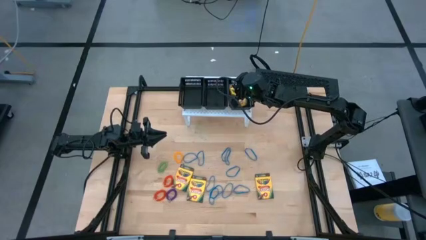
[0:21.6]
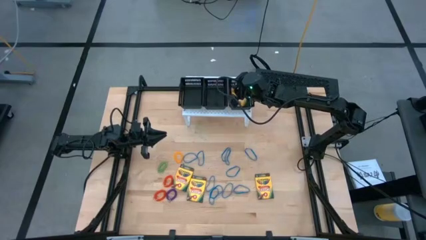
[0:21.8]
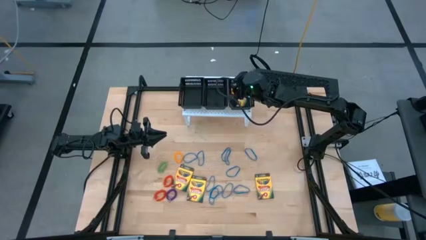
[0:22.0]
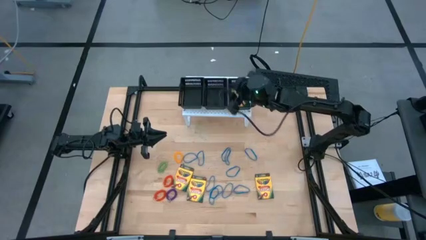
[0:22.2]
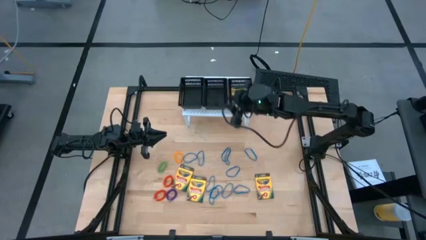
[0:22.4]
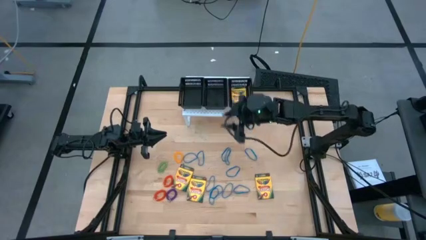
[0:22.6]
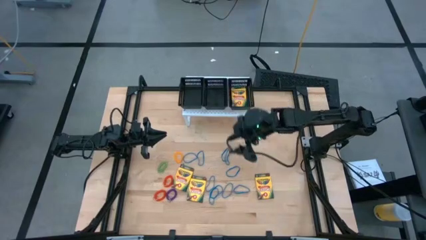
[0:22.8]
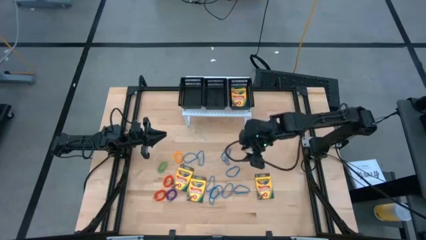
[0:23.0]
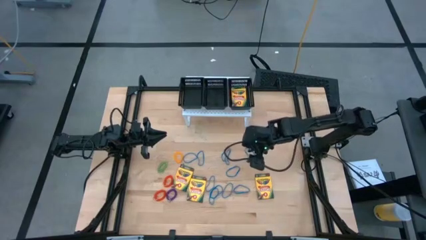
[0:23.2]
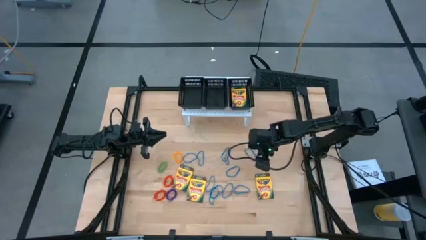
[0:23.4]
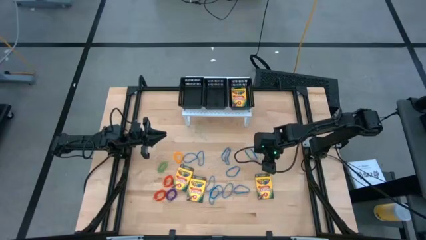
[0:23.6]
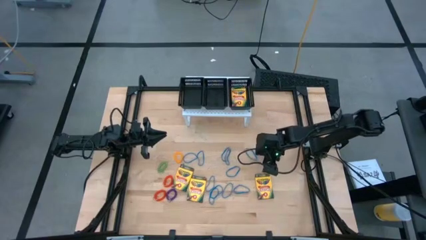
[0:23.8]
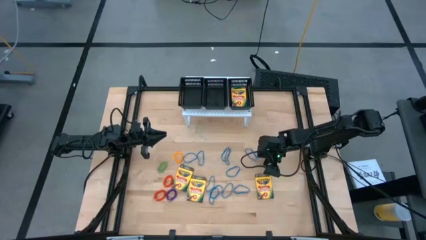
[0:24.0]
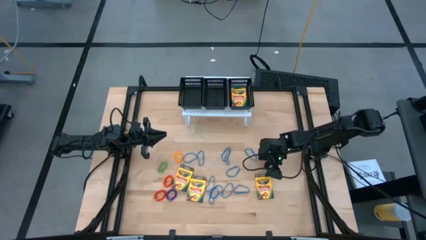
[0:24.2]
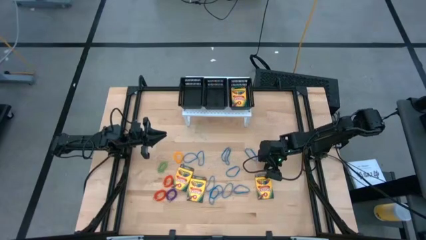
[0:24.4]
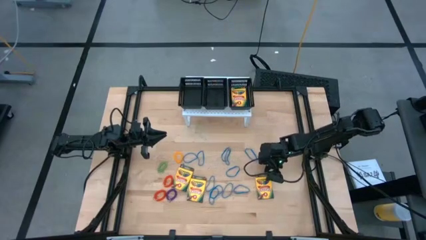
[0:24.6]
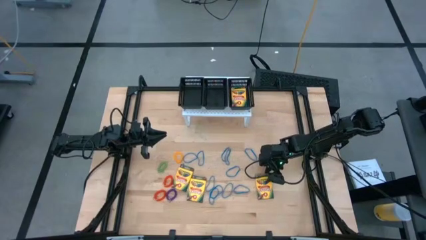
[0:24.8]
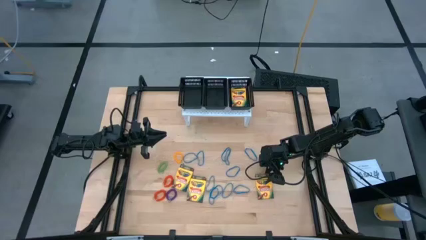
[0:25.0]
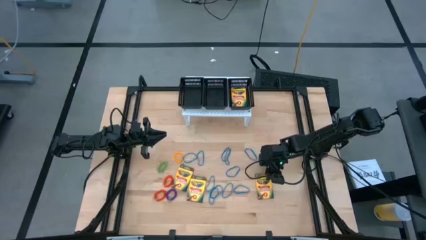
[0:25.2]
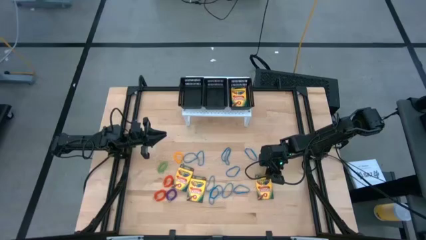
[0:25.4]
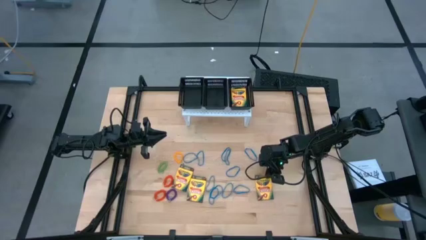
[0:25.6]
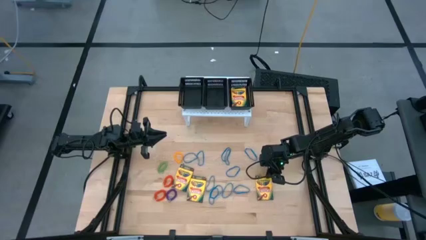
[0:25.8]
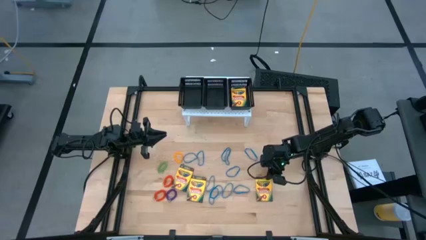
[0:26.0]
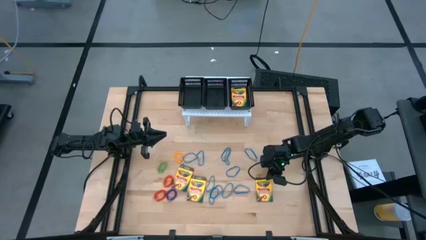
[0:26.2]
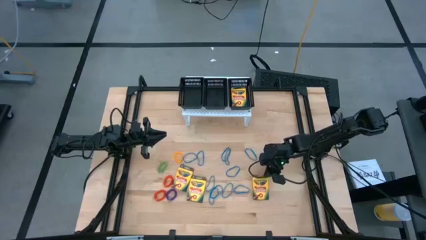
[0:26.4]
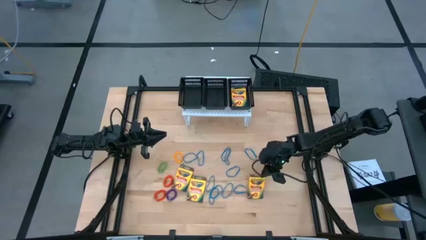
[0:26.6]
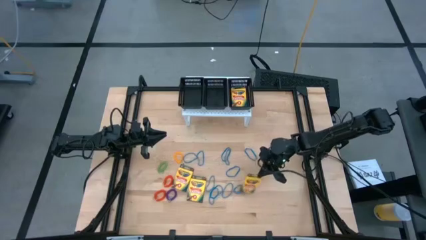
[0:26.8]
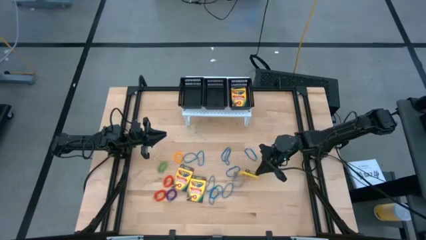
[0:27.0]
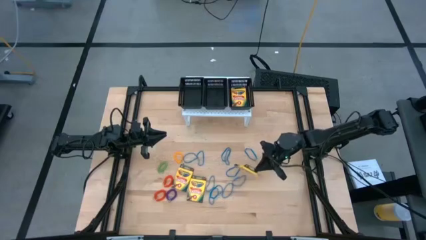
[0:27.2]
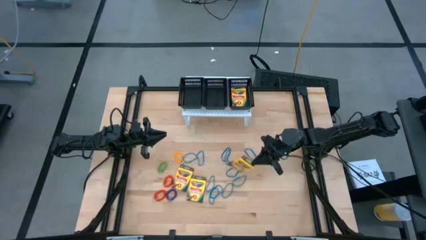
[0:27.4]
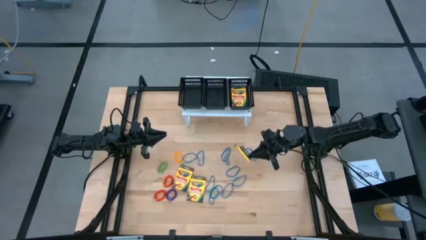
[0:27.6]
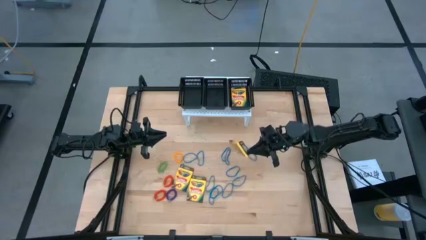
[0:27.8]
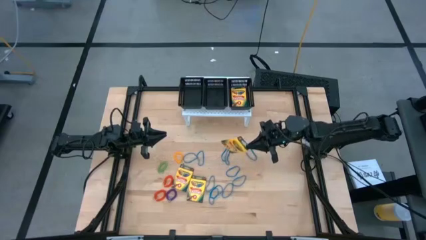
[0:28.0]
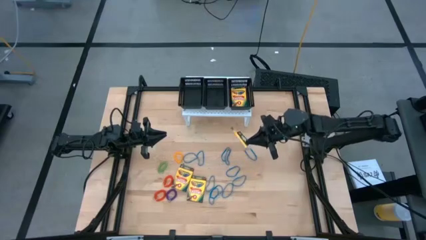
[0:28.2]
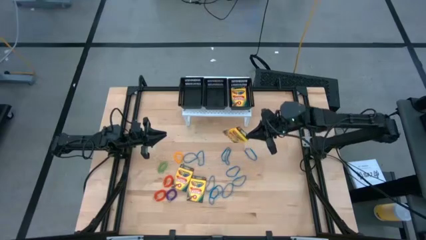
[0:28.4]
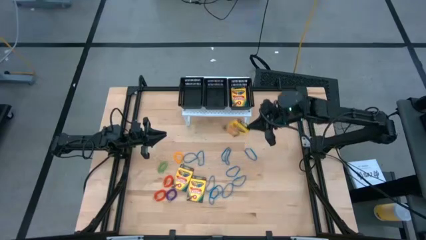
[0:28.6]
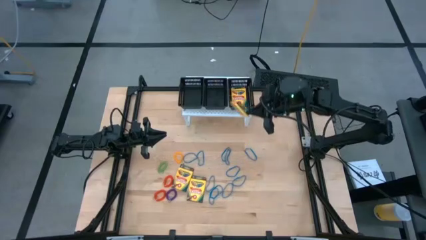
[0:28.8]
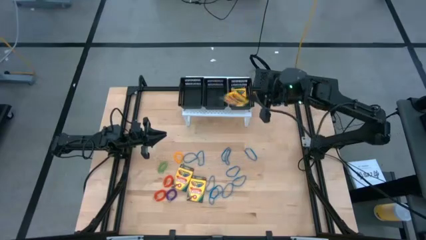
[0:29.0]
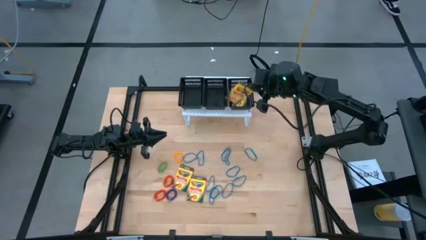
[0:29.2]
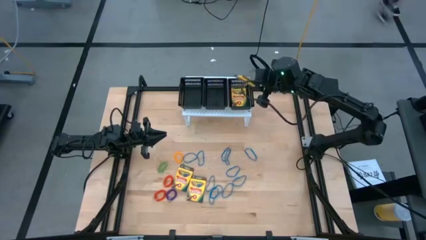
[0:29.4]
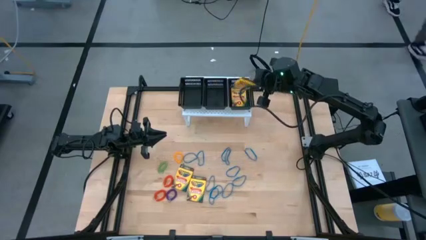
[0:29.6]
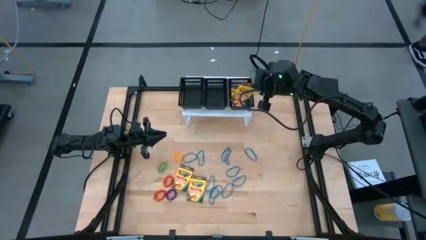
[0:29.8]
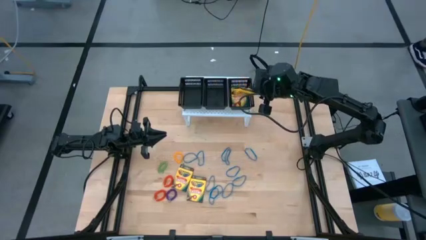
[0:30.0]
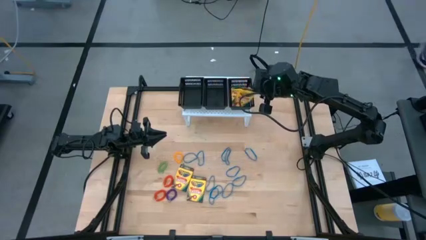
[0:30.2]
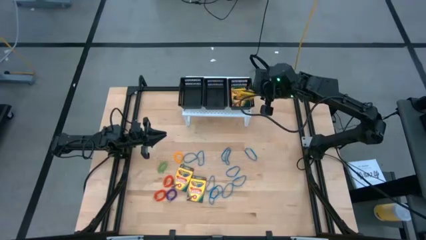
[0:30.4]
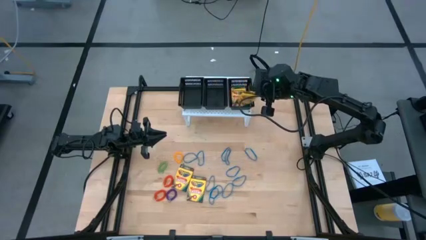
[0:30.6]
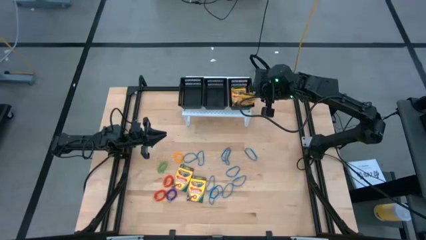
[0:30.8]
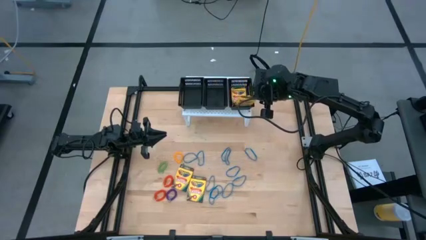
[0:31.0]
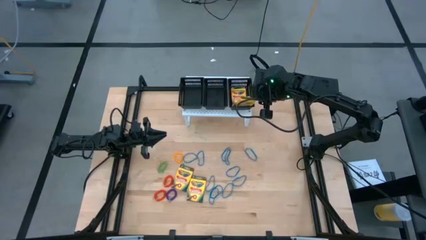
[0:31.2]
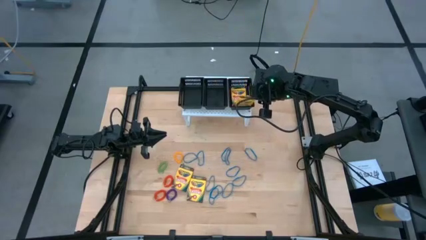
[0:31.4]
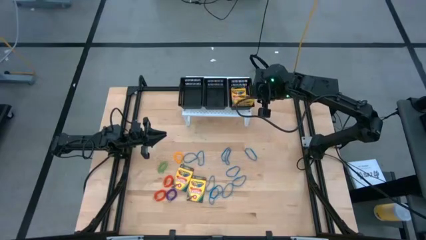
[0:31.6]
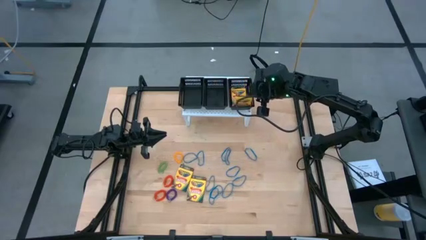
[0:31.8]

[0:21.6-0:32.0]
Task: Pick & Place Office Desk Supplies
Put the crayon box into the right black bin

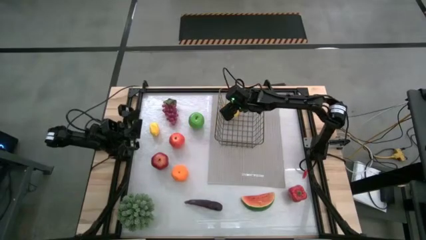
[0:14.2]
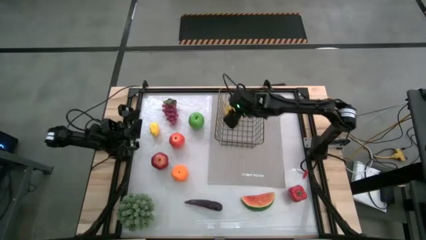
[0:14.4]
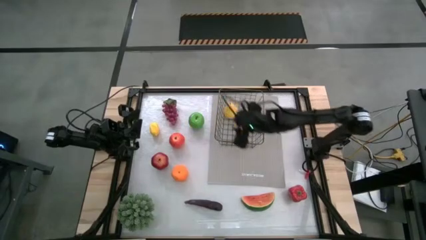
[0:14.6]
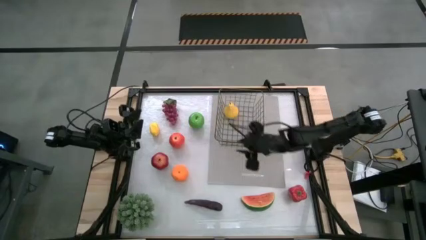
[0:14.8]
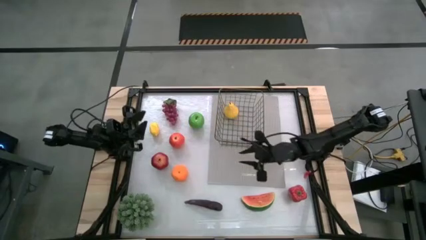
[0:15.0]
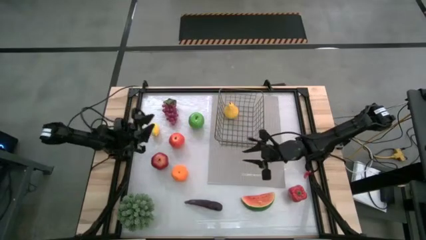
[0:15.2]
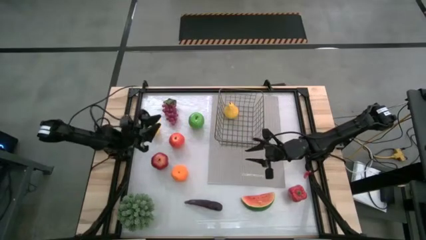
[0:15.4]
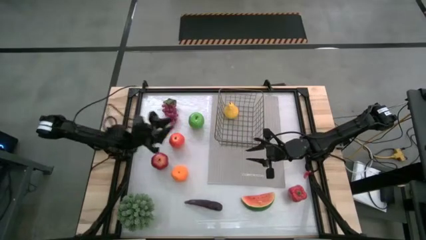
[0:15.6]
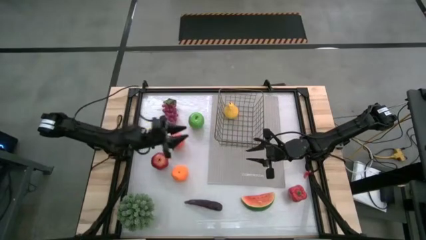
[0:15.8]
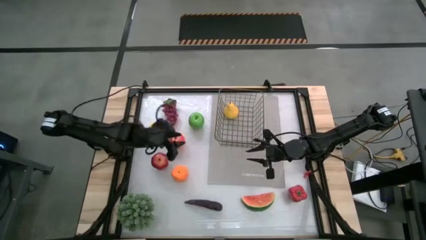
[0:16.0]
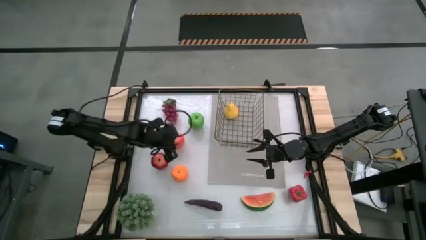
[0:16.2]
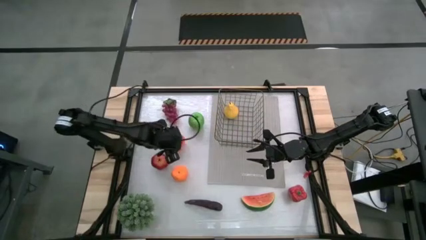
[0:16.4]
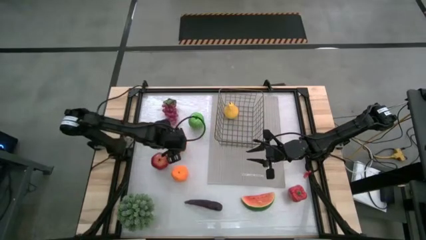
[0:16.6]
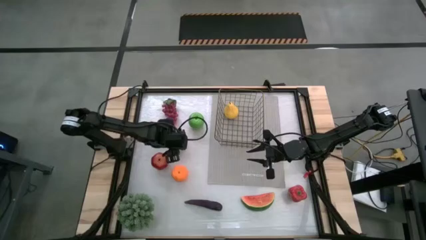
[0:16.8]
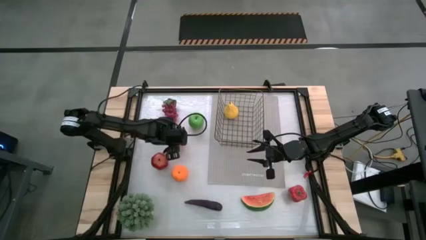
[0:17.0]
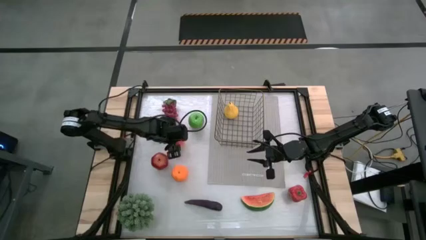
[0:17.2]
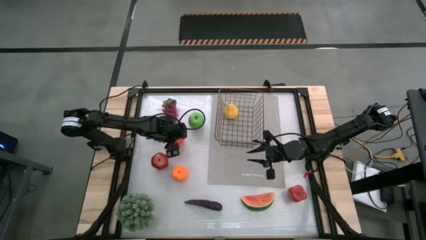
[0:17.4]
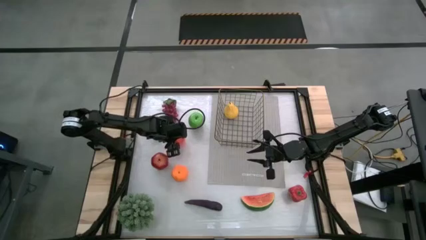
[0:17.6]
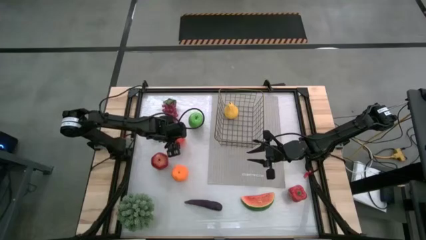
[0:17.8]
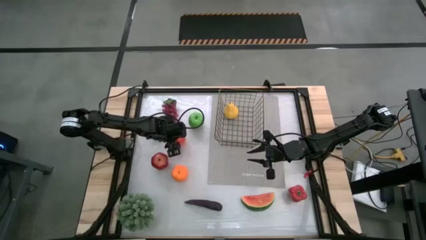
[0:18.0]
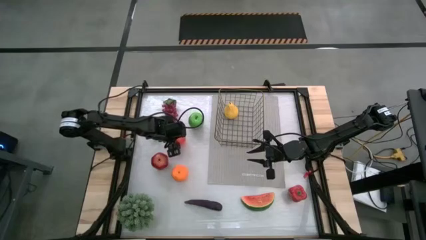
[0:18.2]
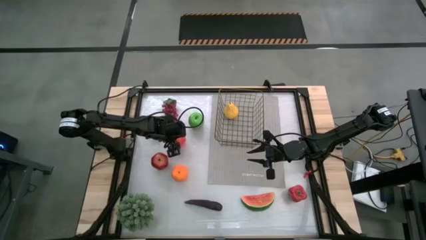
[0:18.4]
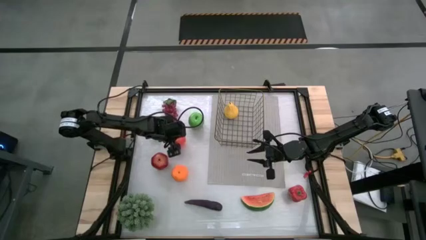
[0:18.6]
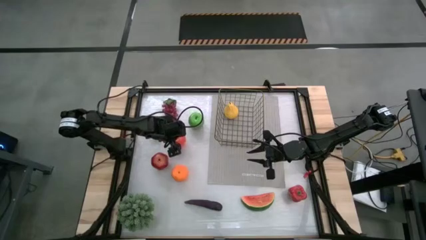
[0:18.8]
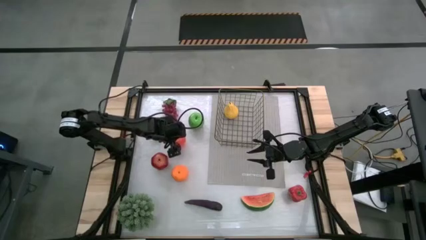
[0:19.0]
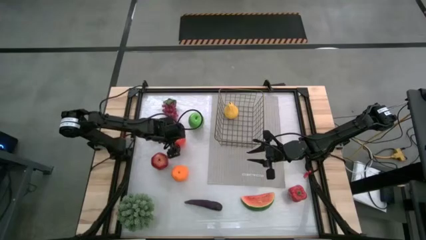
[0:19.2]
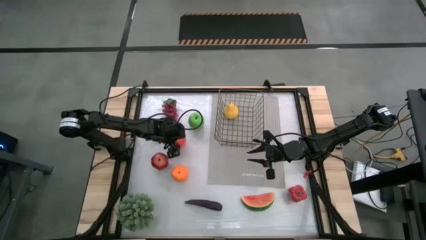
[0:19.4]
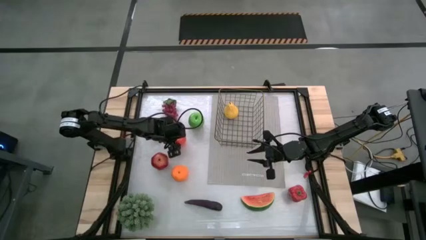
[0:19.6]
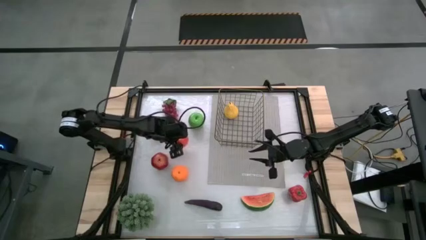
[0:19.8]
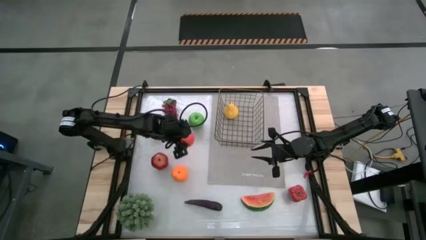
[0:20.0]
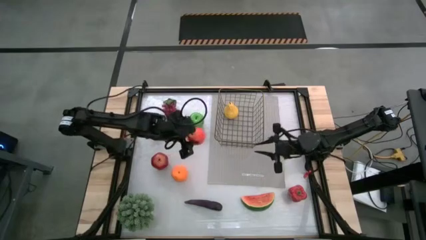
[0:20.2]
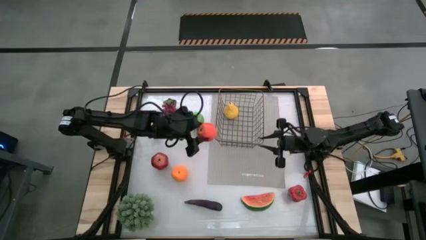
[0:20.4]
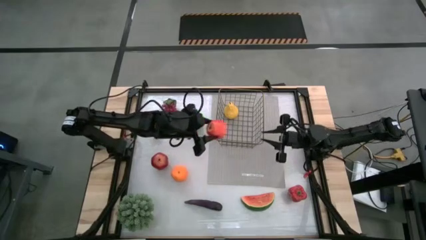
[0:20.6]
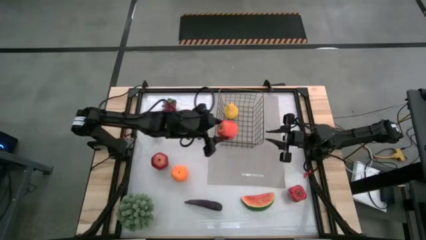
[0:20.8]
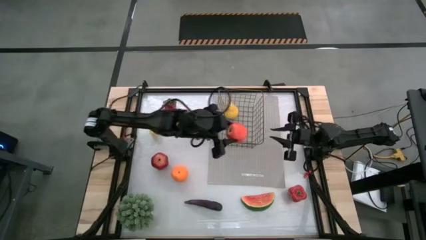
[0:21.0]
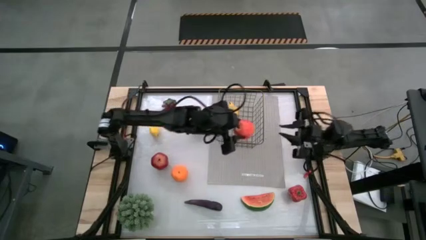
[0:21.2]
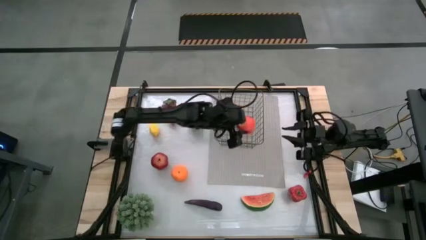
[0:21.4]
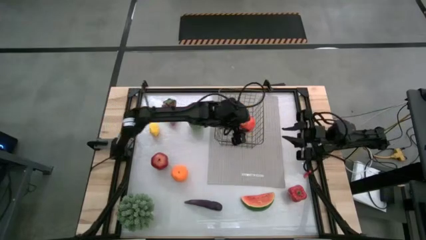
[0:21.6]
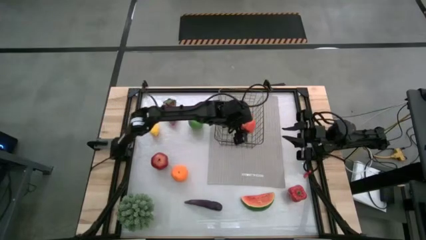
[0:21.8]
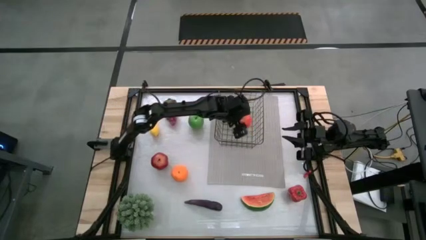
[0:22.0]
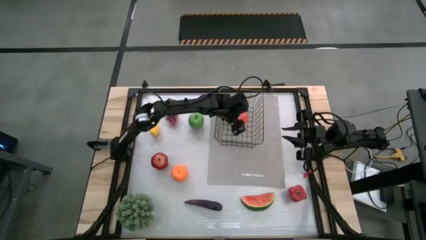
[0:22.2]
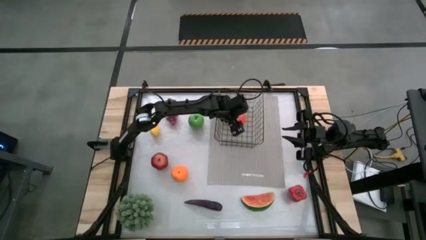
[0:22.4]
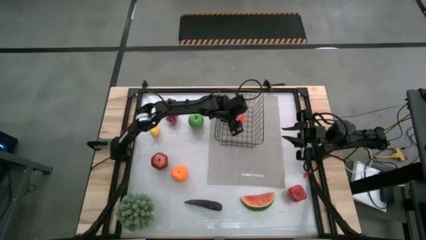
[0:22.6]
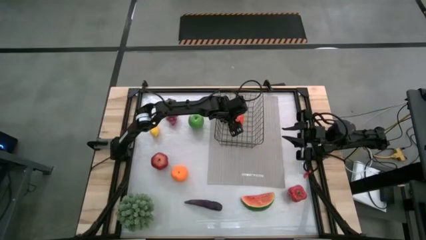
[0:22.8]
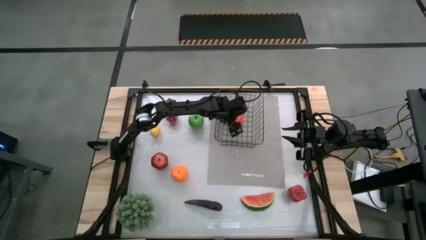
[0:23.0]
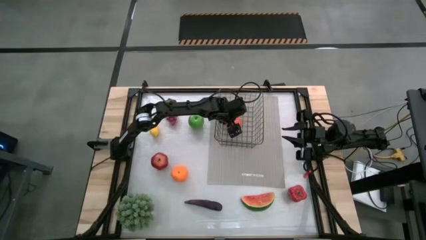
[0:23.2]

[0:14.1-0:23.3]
Task: Build produce basket
Put the red apple into the wire basket
